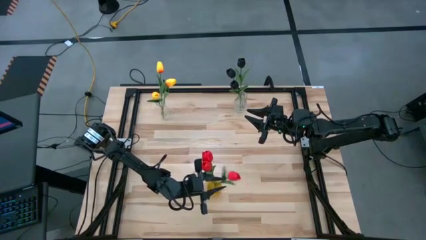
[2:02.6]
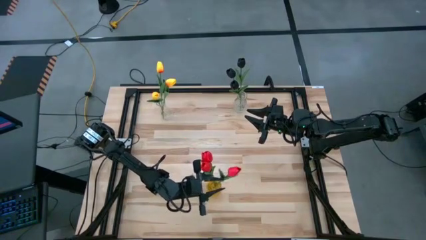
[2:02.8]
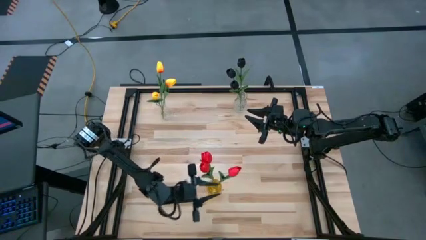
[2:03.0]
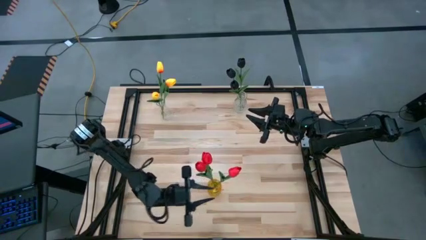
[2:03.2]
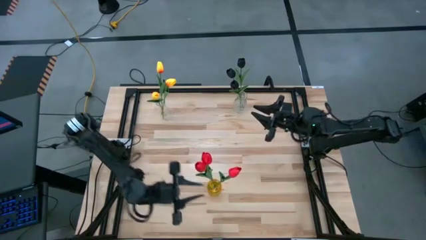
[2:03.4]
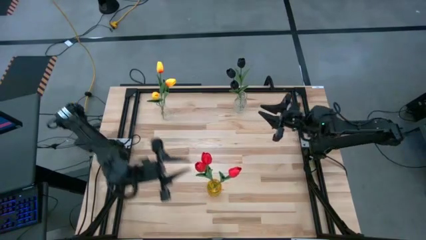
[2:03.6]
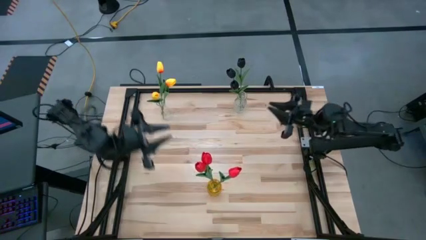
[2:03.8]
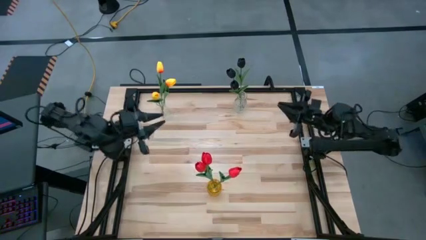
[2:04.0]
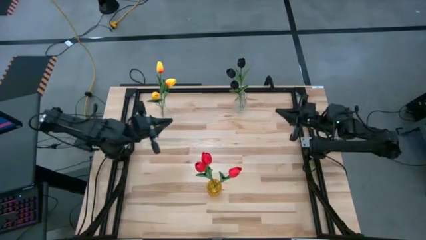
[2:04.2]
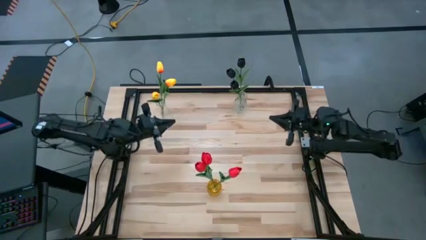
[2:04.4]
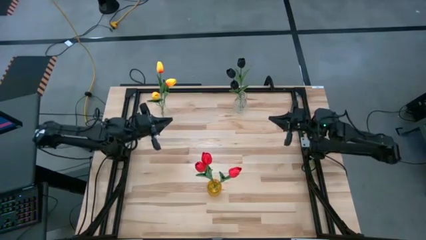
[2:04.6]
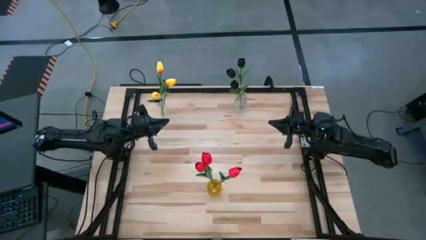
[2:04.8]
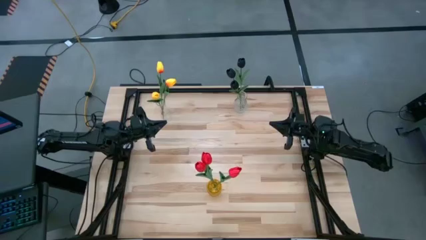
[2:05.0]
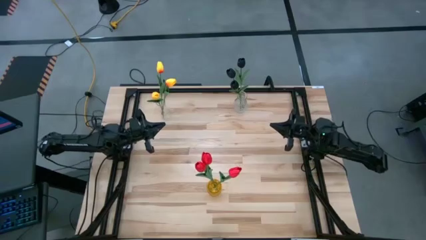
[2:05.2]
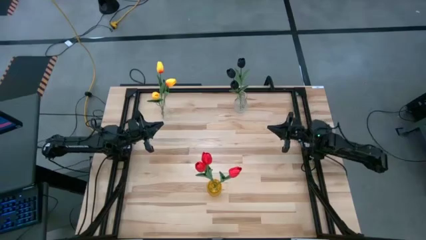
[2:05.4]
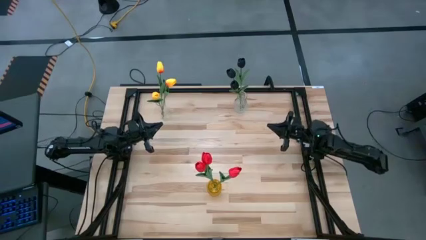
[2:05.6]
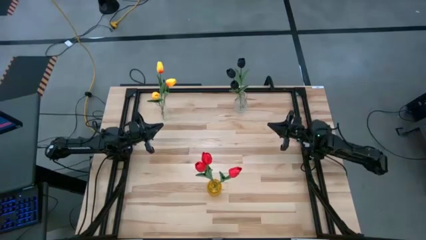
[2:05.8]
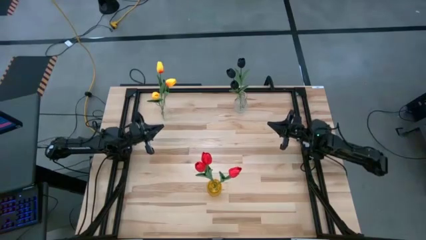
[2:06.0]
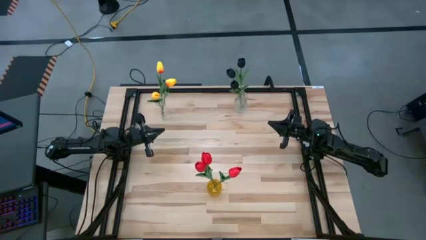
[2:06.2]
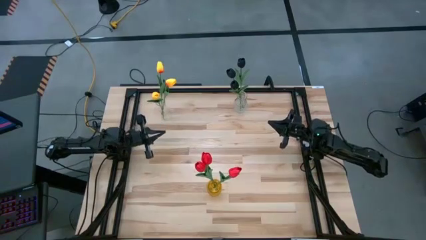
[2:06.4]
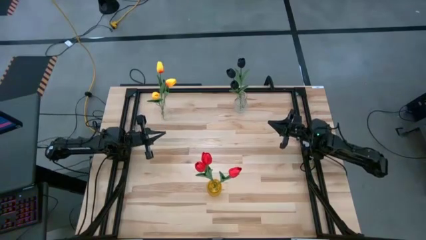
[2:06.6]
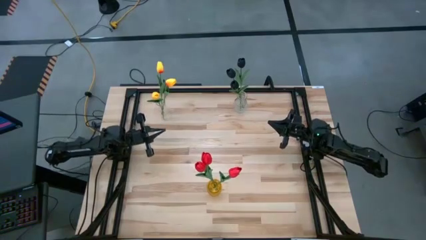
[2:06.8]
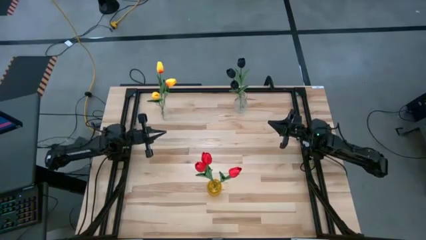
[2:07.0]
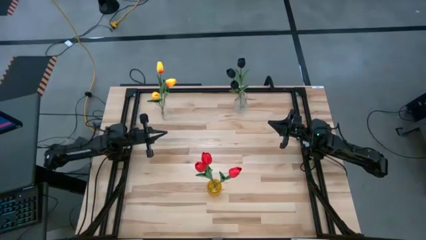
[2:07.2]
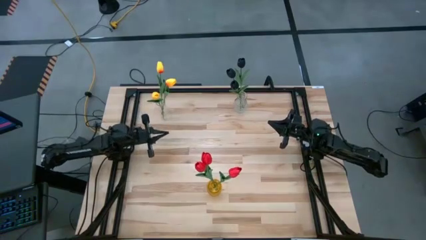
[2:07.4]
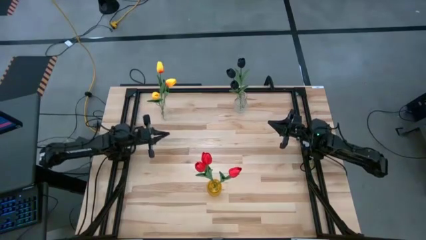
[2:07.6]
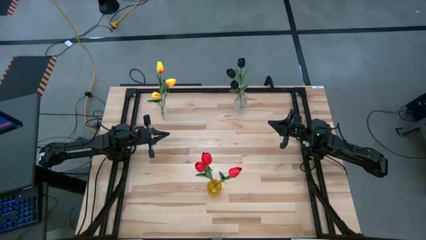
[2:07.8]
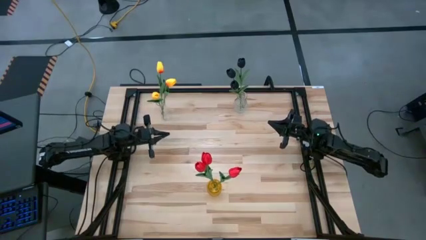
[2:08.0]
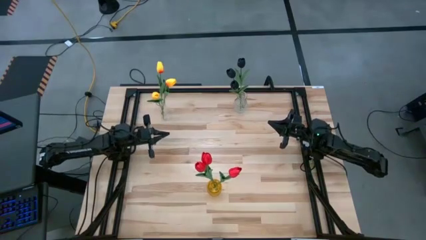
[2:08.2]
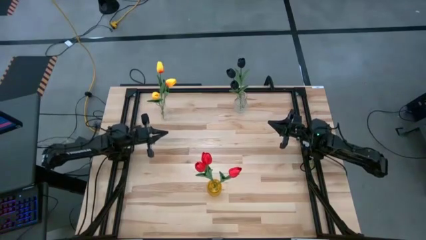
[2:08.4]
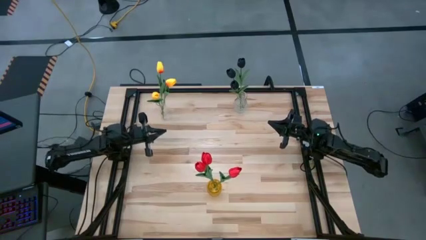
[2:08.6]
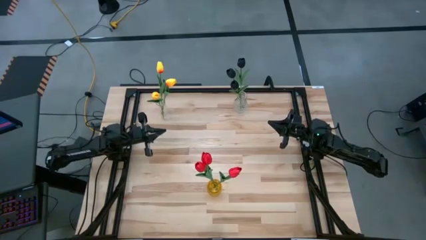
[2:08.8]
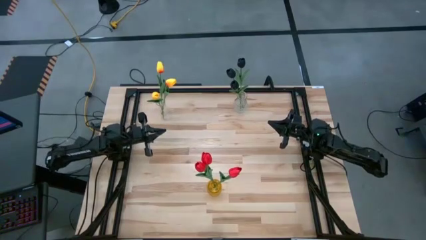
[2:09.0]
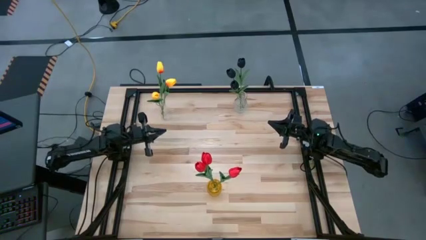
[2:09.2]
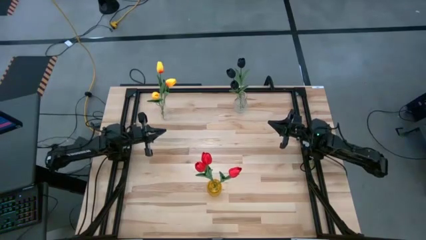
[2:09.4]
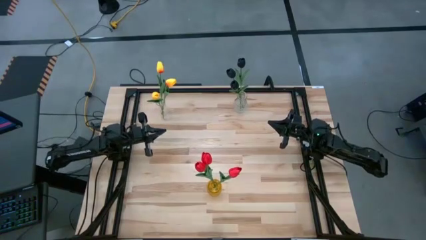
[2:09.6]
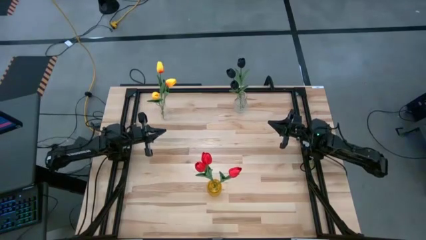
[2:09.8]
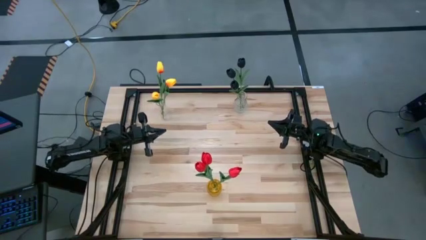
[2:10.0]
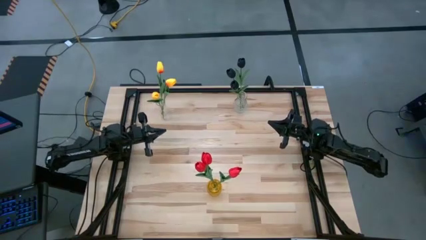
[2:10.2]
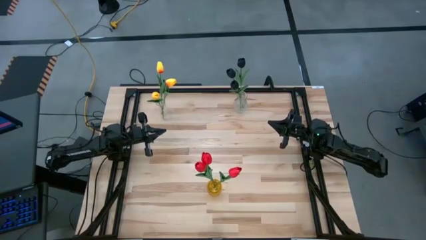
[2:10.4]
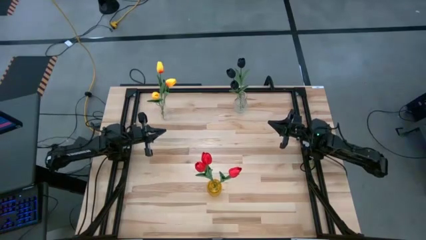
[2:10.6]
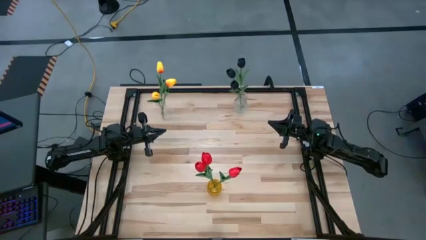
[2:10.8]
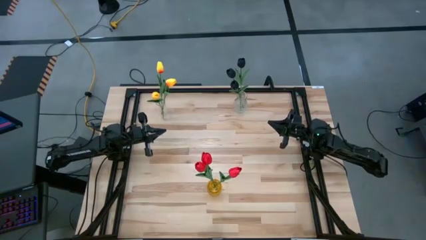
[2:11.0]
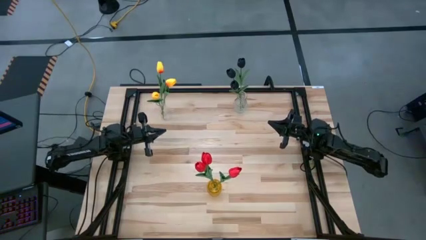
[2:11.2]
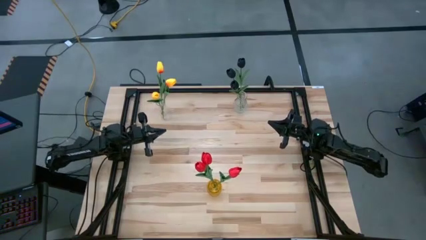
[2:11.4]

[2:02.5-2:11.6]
Task: Sort flowers into vase by color
Return to Home Position

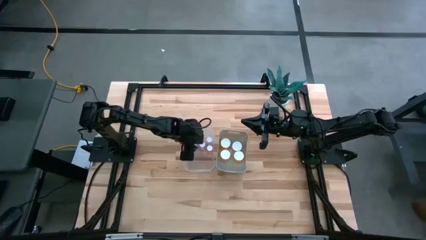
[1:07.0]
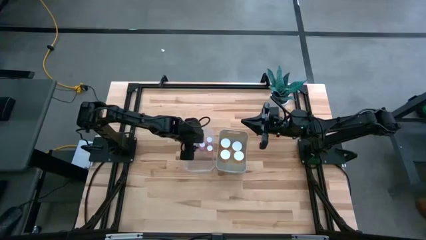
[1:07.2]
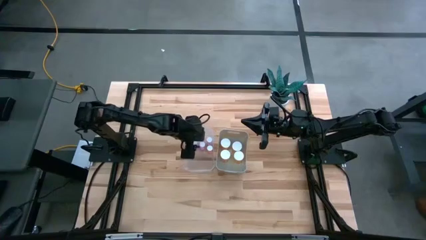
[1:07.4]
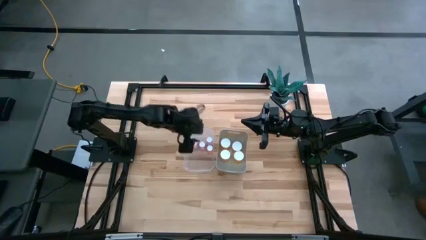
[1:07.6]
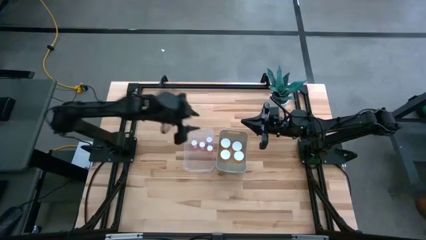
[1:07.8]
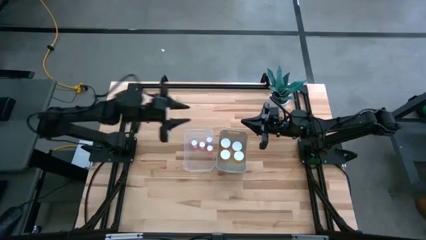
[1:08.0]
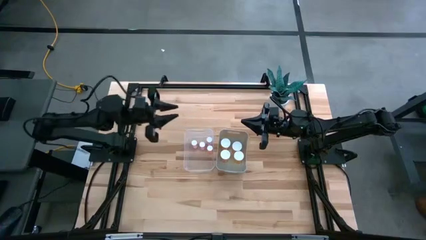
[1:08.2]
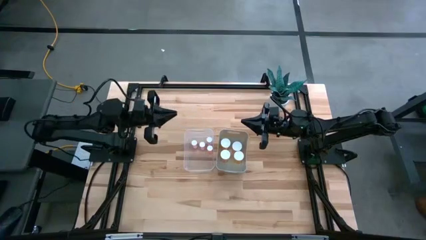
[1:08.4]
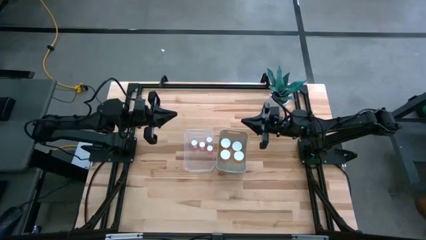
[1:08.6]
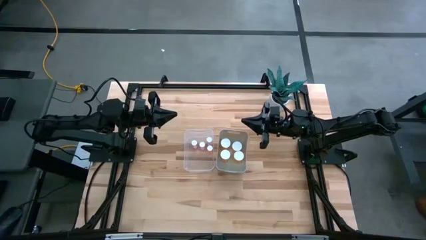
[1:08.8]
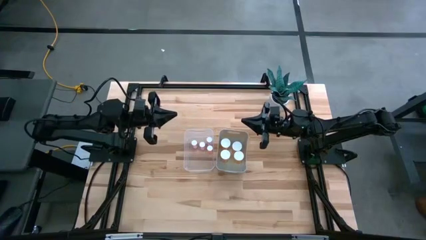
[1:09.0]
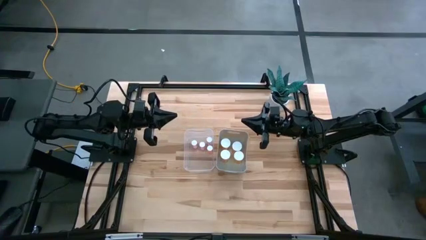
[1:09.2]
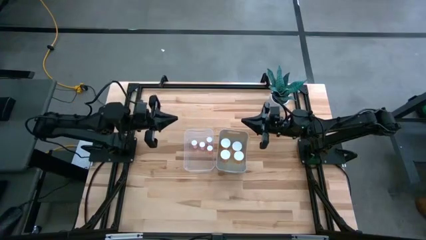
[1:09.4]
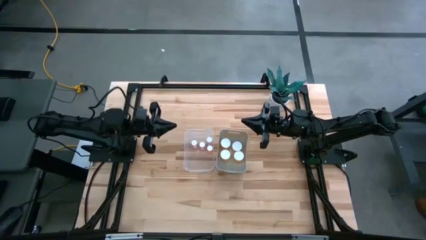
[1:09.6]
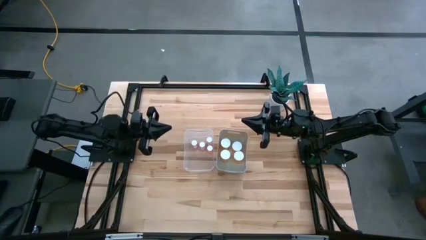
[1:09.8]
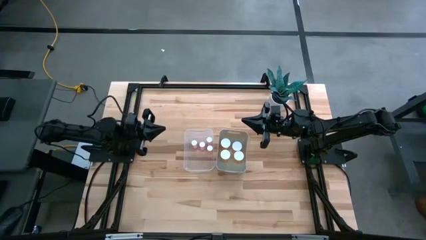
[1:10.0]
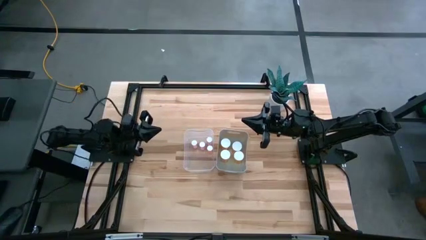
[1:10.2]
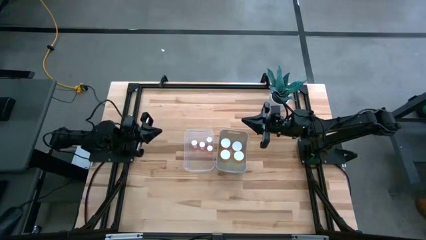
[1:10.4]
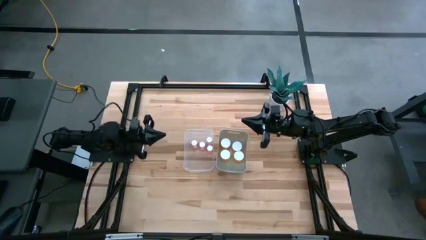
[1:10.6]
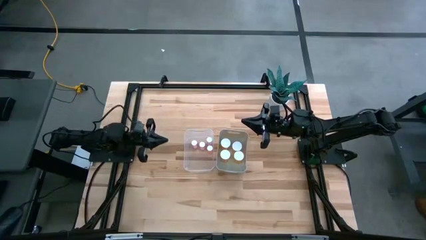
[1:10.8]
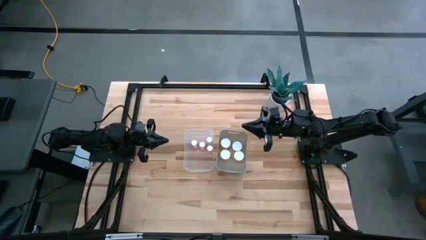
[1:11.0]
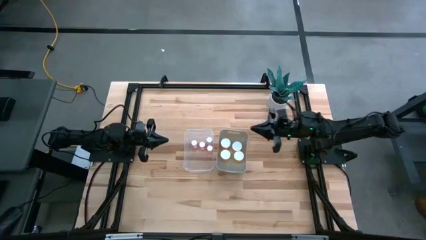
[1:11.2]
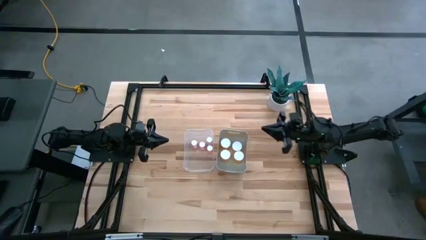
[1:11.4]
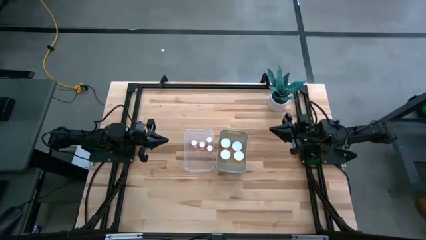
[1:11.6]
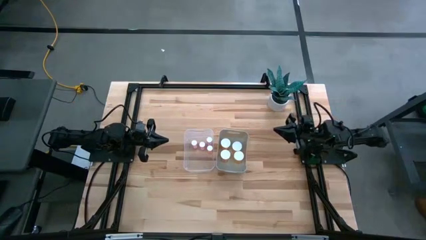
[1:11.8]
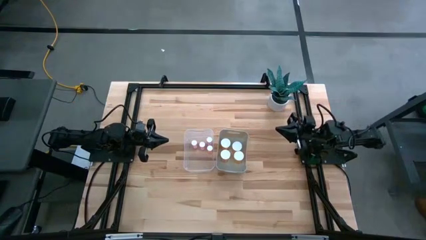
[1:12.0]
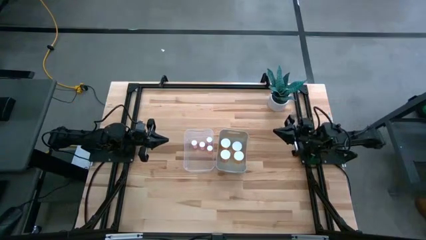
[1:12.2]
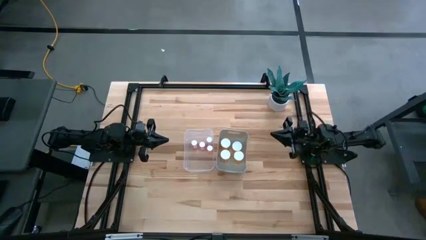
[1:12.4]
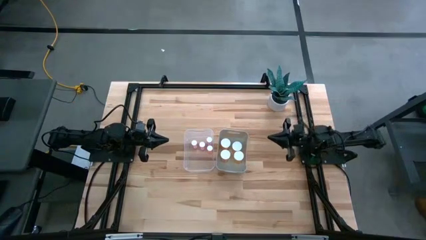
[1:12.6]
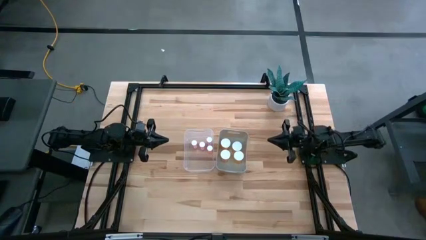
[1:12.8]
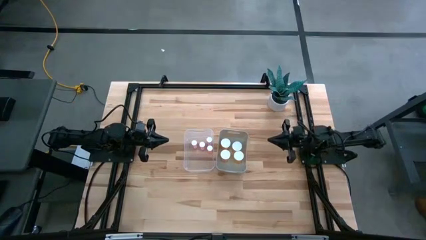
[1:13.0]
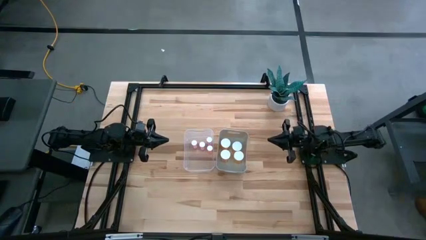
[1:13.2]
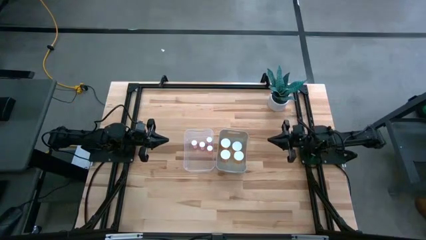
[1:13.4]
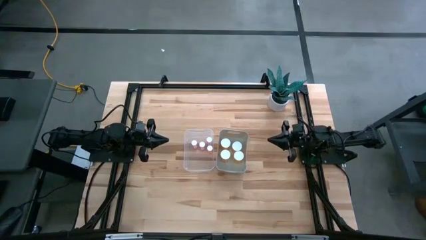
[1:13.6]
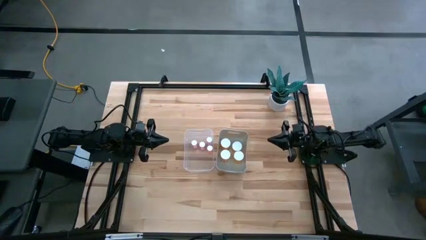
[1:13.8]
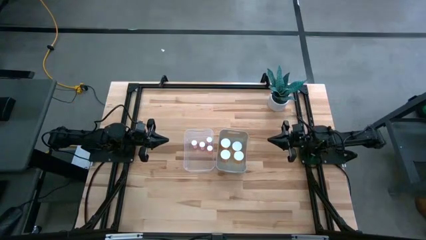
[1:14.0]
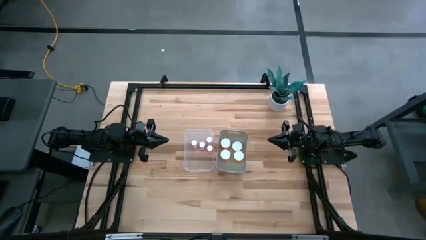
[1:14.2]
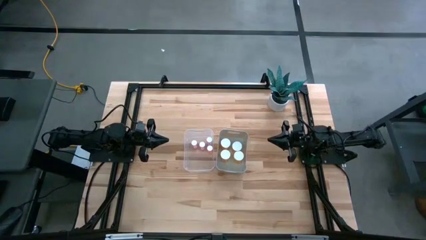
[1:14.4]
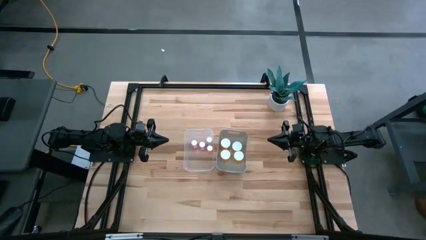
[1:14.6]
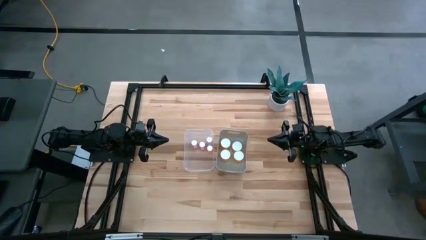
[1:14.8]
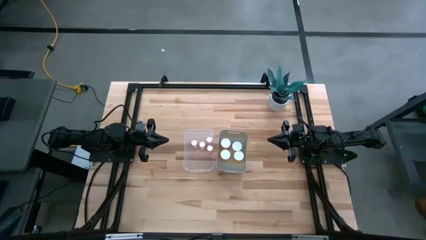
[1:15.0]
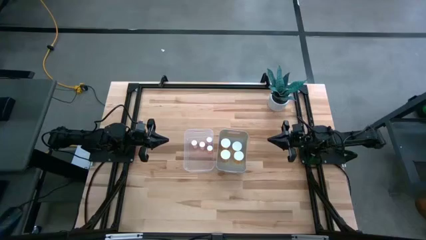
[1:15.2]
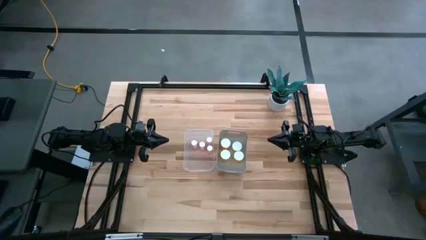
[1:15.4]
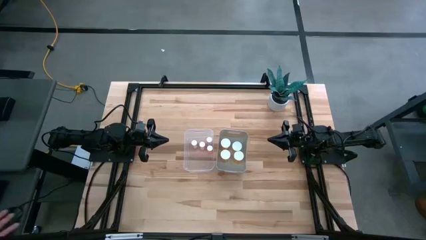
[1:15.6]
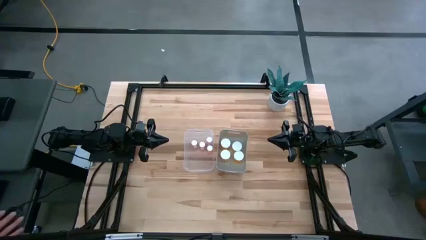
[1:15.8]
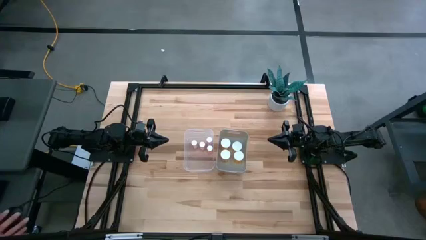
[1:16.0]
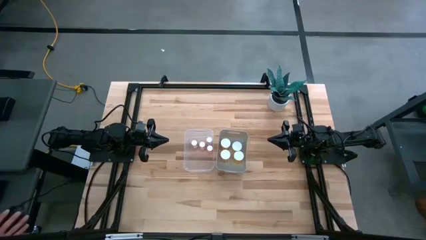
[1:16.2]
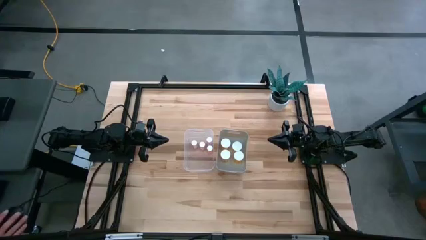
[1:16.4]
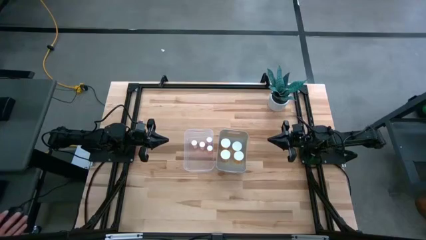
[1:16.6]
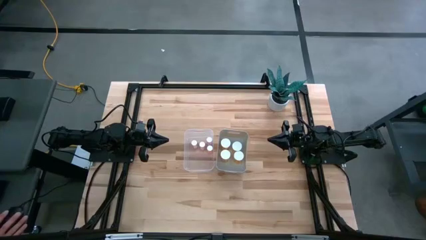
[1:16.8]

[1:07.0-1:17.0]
Task: Pick and place medicine bottles into bin by pill shape (circle, oval)
Return to Home Position
